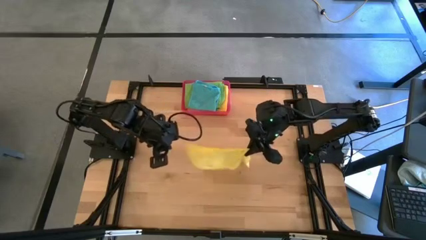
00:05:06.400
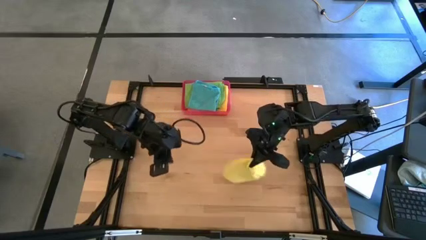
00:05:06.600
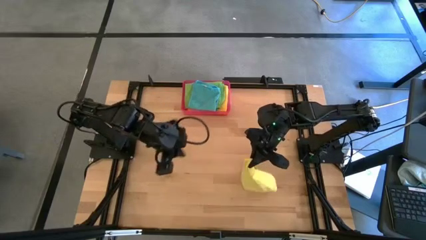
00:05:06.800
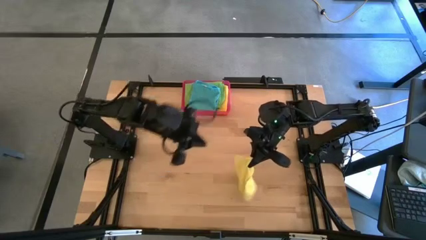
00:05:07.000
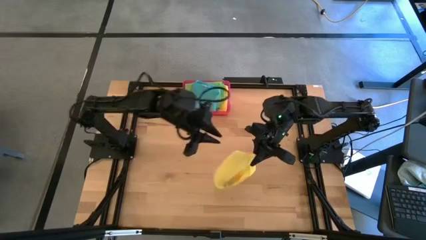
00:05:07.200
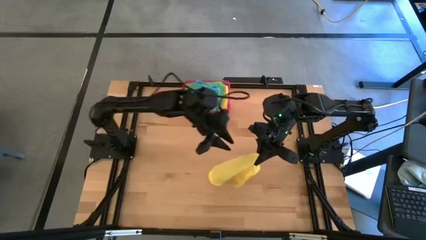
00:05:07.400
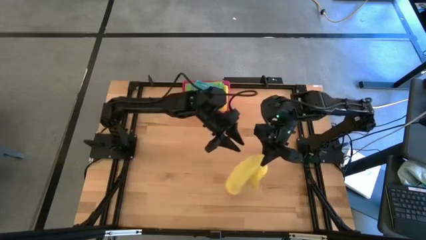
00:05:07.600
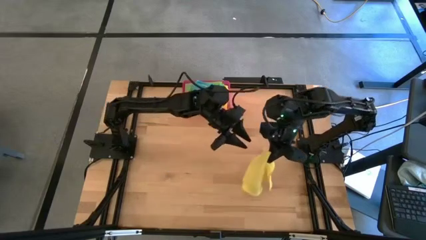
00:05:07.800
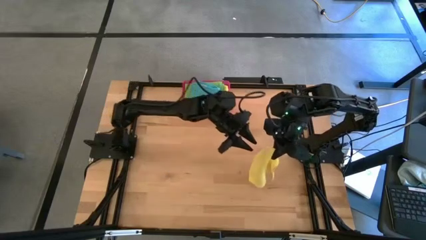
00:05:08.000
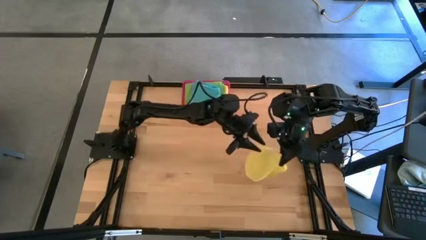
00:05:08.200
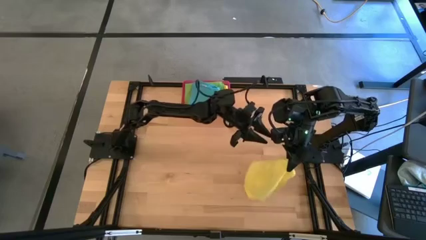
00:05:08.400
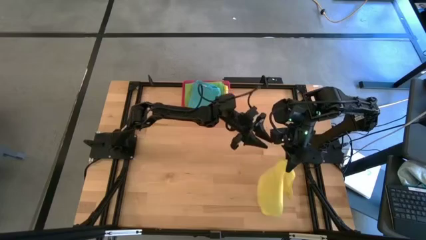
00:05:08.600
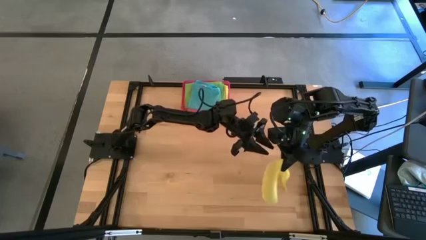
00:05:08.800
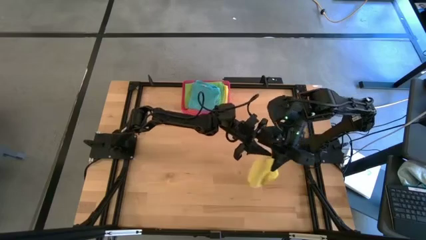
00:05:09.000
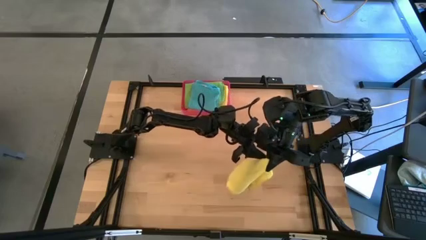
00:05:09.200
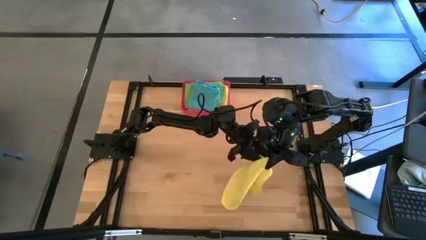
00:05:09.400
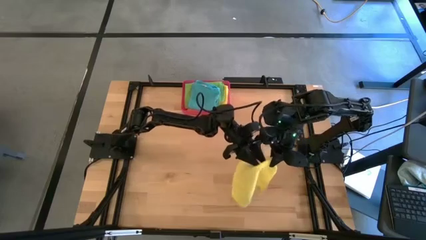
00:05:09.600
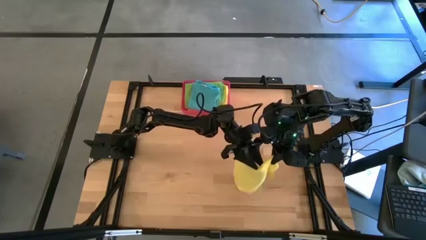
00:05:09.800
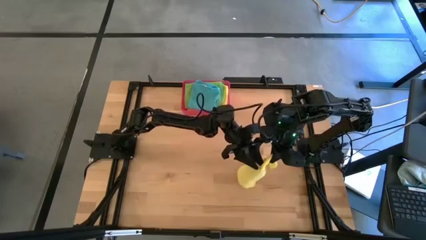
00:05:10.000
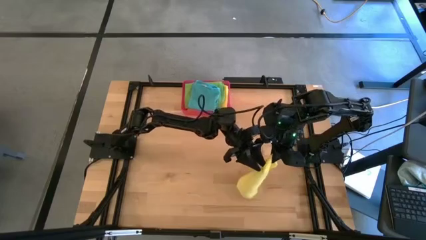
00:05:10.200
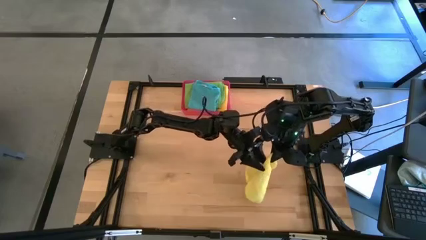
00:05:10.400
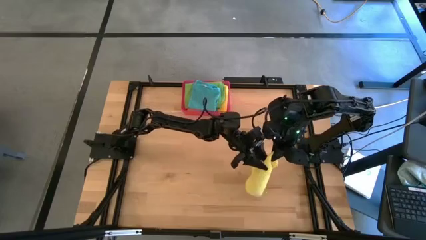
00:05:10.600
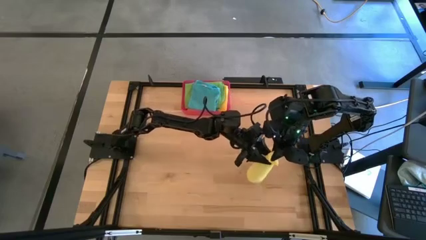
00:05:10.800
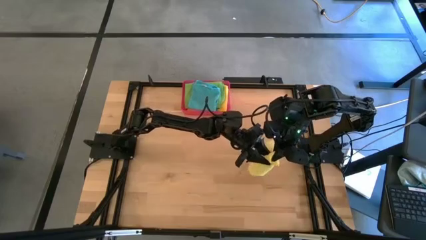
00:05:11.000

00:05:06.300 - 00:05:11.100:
Task: Fold microfiber towels
Fold the yellow microfiber cloth

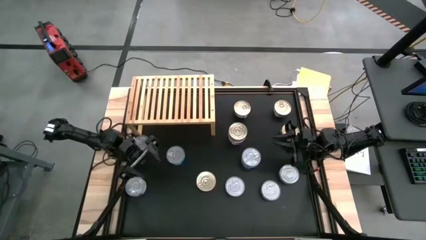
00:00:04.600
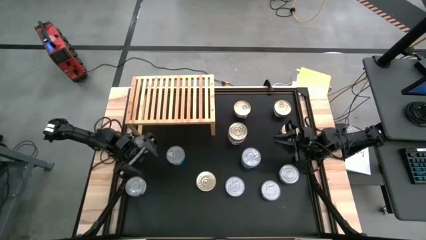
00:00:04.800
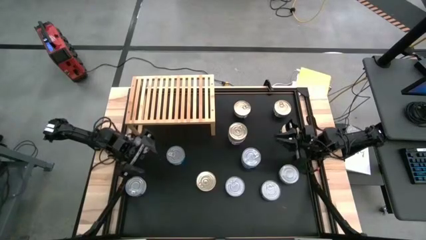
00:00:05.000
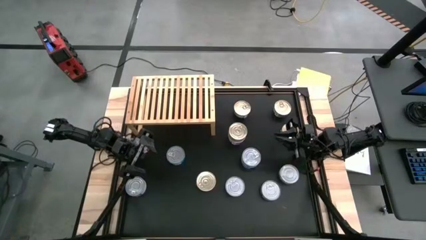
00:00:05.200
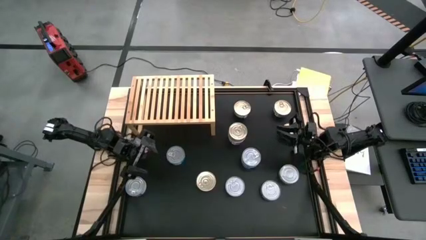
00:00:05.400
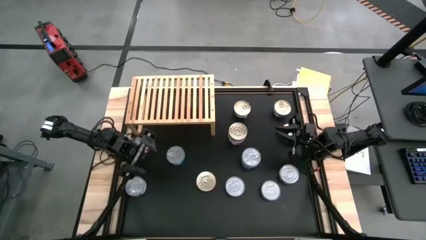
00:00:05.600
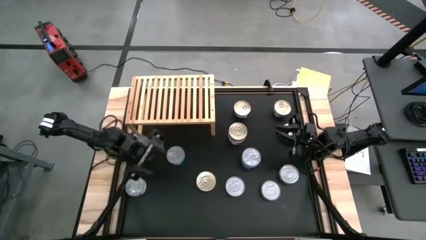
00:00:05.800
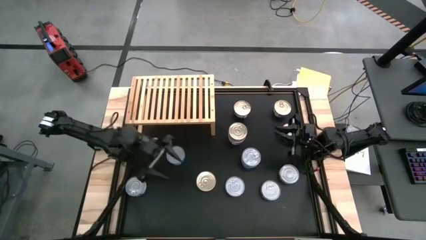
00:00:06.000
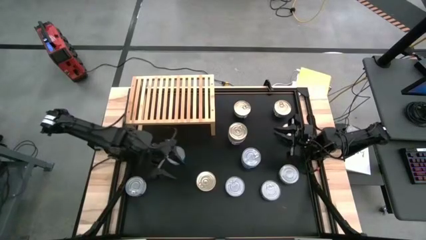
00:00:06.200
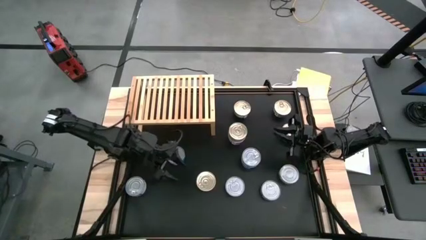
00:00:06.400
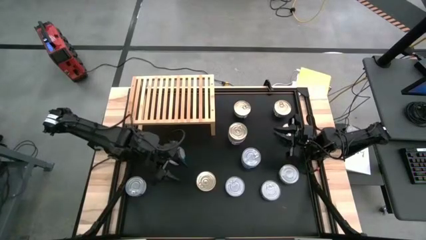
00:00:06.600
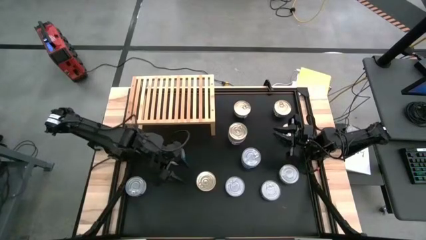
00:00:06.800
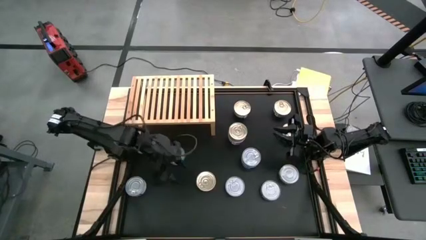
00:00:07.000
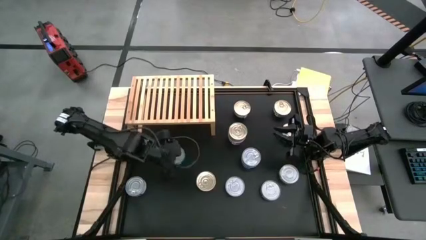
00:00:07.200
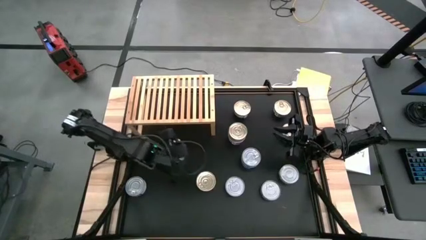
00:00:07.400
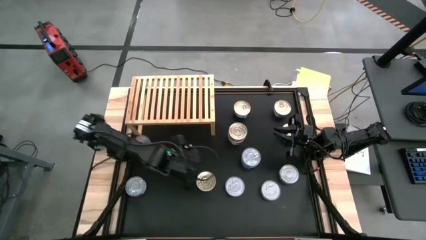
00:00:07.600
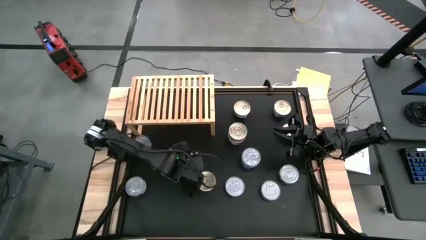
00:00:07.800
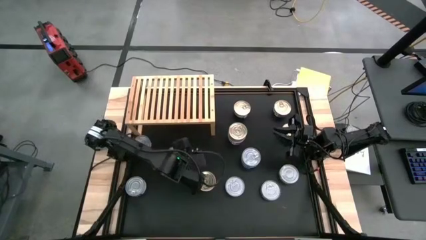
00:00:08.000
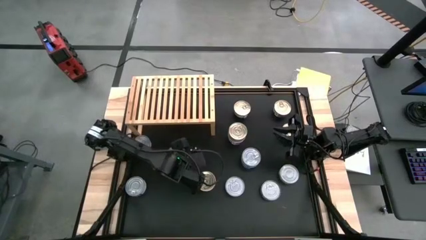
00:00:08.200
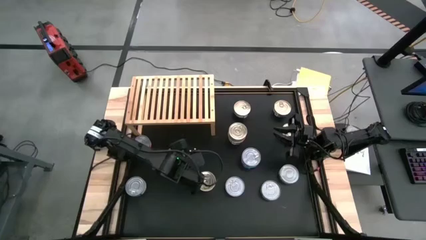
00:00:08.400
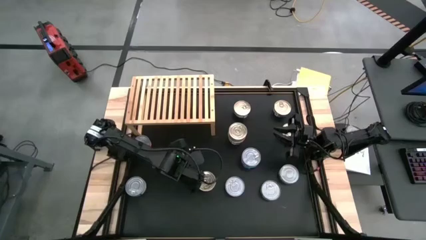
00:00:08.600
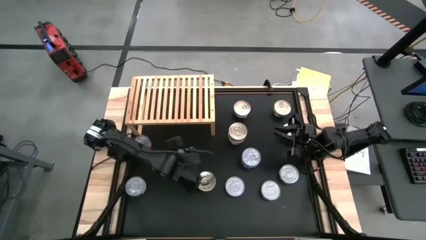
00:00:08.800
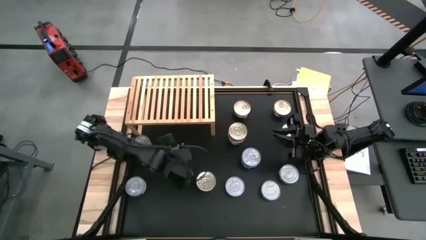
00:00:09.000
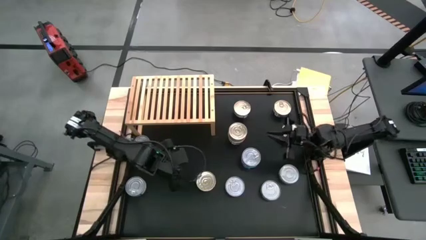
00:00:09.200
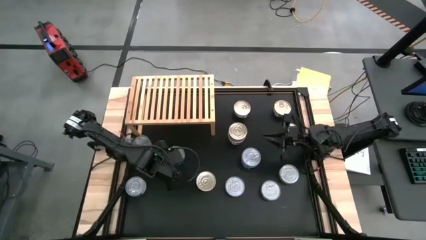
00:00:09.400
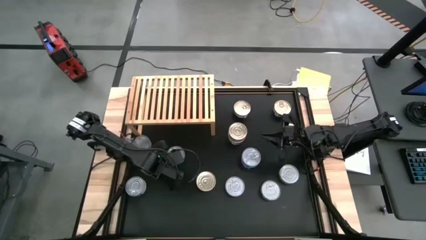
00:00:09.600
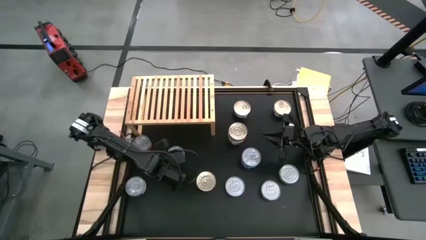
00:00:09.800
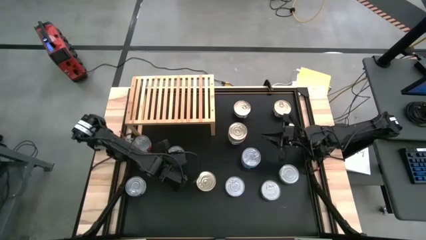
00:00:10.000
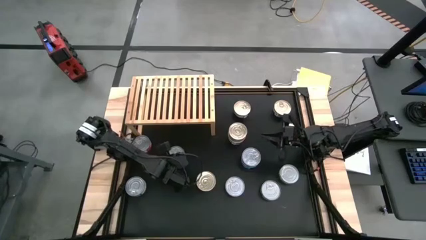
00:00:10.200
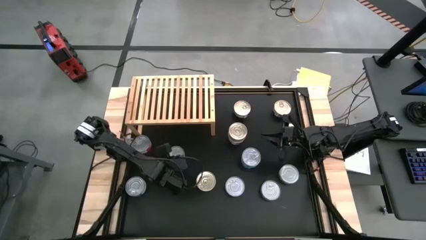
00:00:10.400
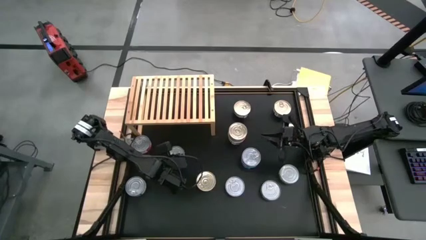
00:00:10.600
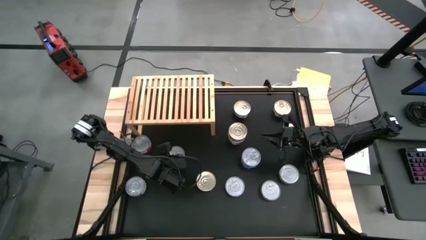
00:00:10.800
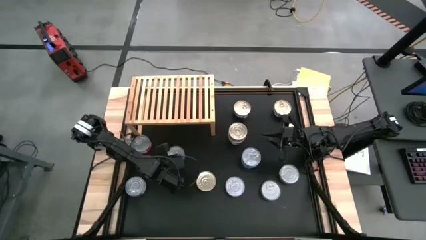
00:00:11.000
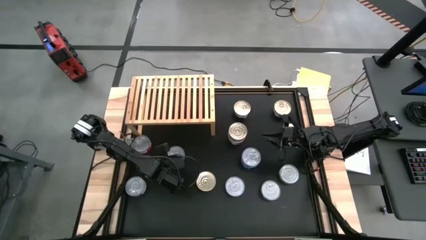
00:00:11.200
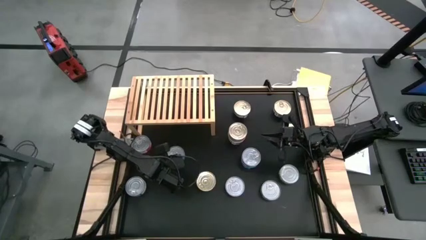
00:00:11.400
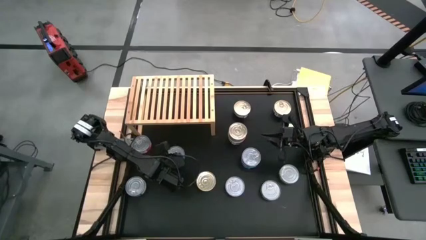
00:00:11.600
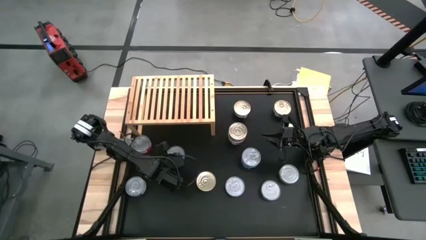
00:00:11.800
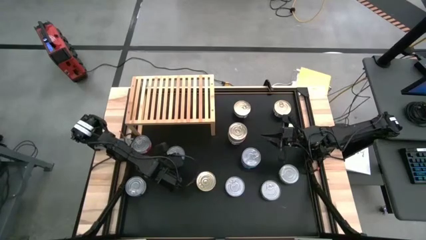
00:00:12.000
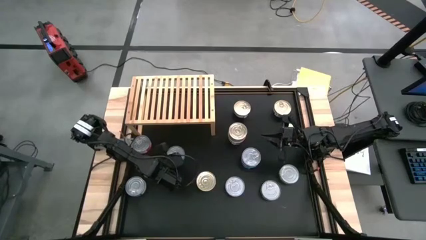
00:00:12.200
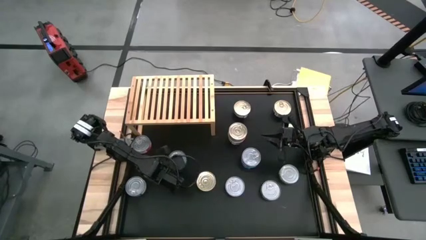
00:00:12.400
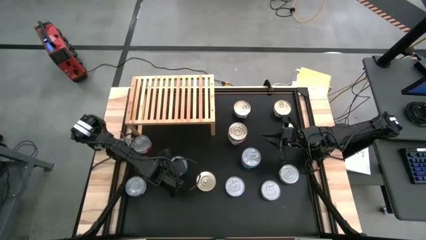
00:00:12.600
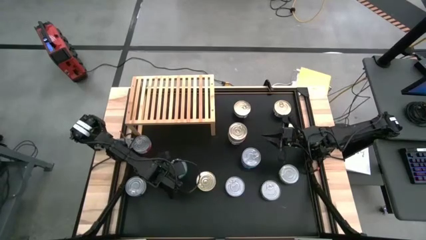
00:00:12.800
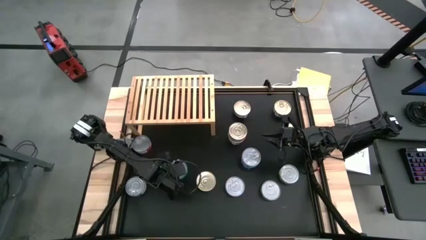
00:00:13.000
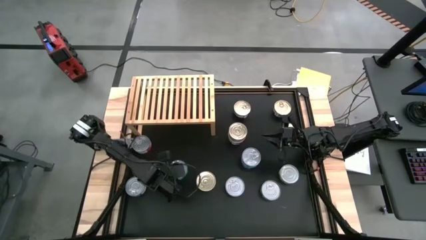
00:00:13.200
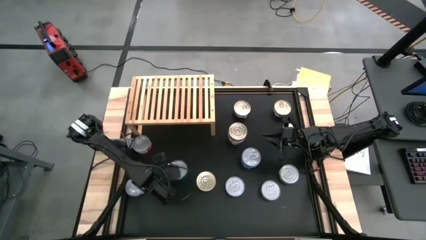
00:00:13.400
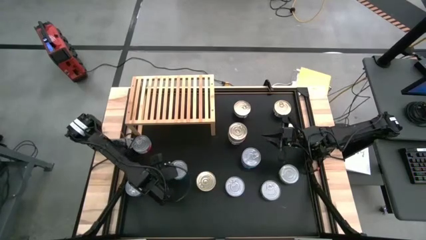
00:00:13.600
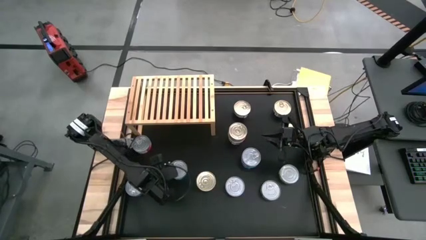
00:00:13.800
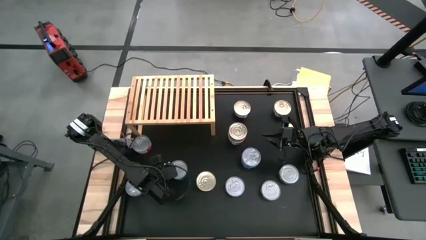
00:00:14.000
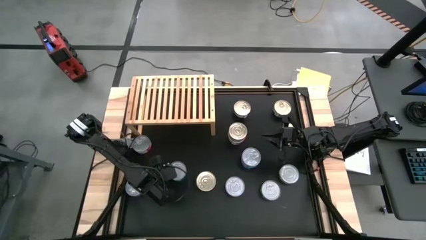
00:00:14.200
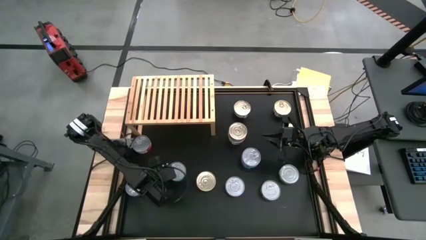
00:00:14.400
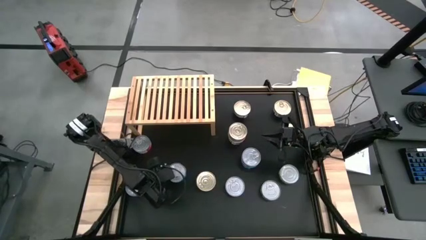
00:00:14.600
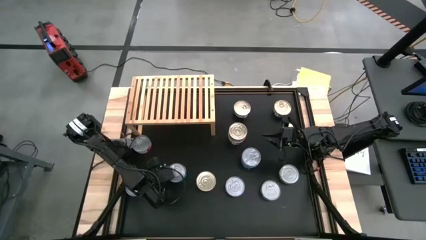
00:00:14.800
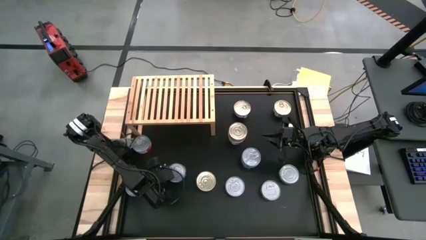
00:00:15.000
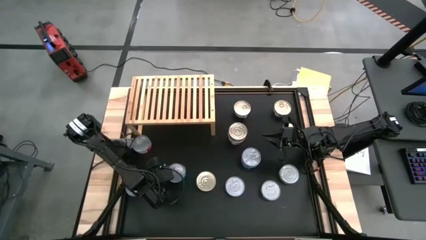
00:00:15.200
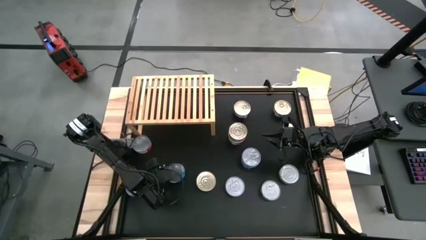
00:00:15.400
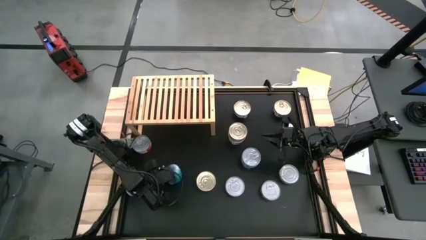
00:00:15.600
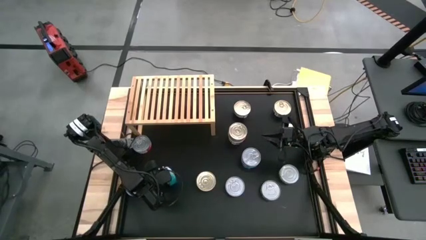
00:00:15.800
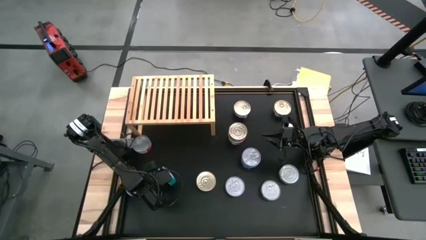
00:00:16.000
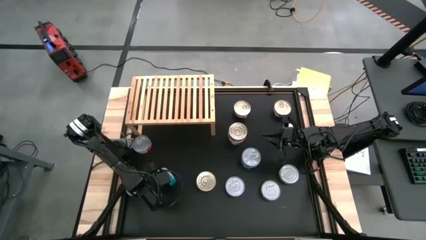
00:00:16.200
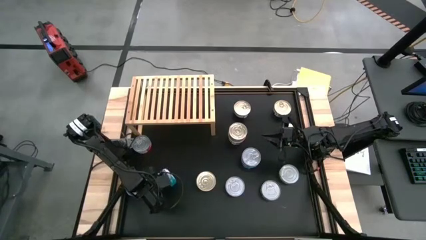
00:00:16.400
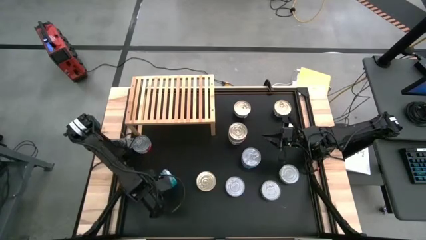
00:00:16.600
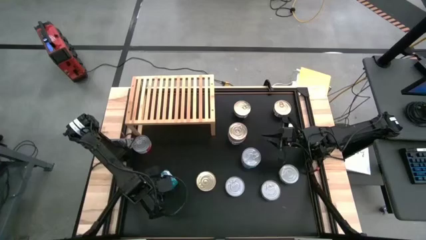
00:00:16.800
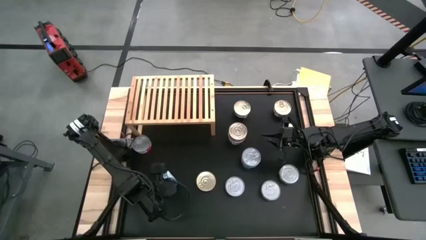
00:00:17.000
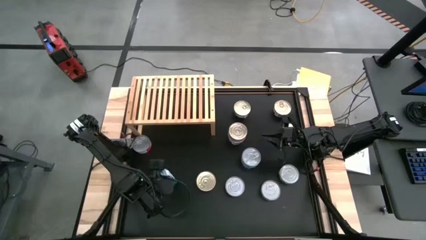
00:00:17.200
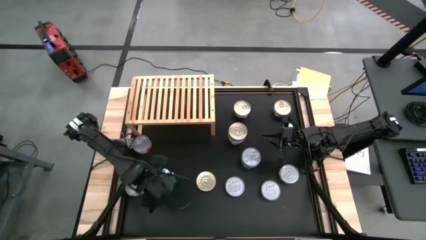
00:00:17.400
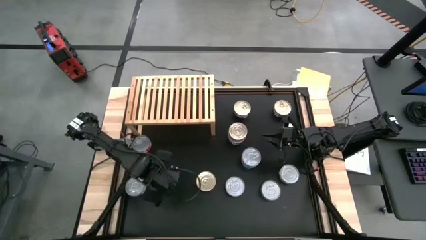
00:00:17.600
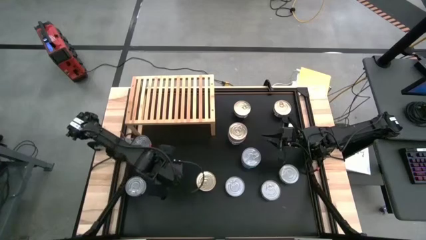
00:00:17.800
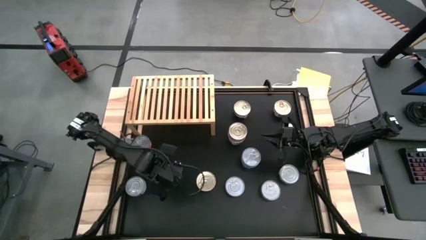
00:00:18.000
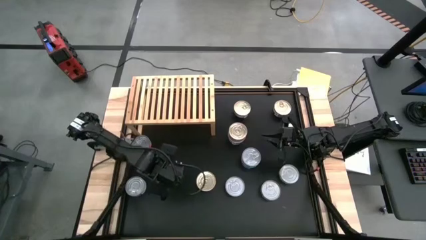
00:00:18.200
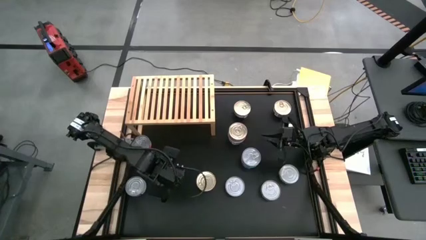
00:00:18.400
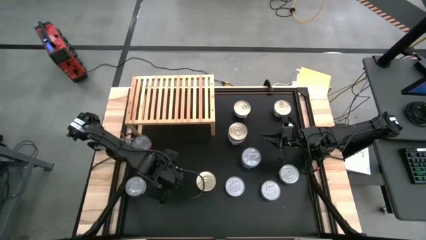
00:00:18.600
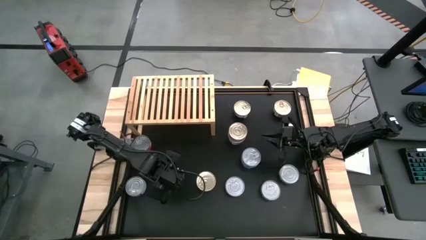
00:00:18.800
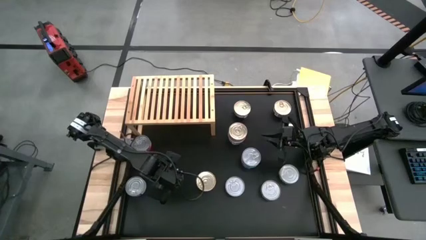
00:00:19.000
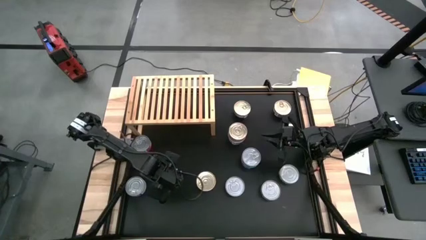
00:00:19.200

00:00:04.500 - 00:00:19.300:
Task: Stack canned seafood by type on shelf
Put the green blue tuna can on the shelf
